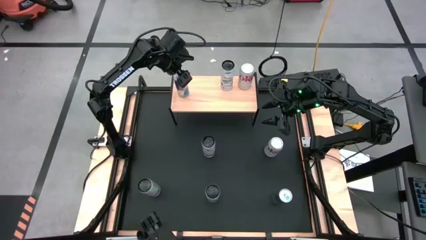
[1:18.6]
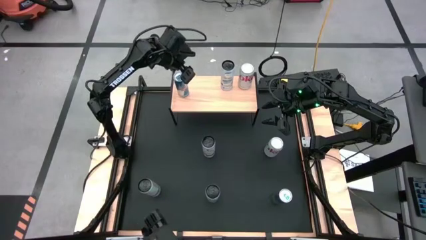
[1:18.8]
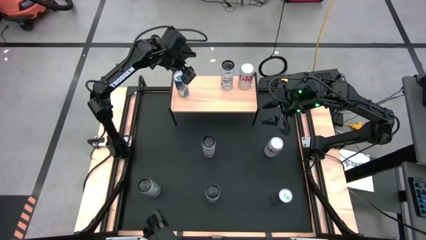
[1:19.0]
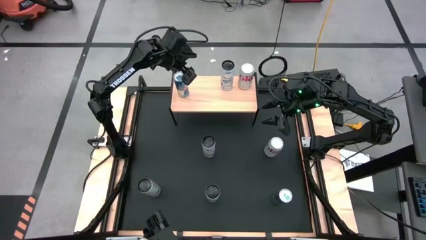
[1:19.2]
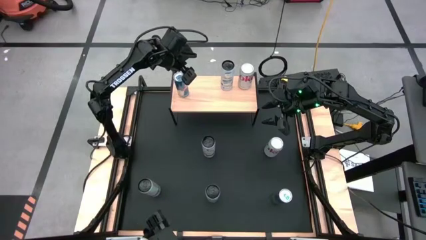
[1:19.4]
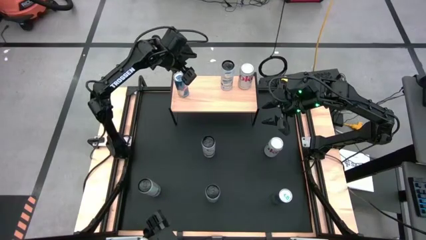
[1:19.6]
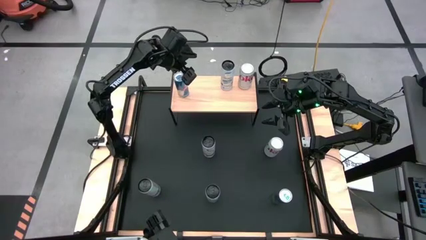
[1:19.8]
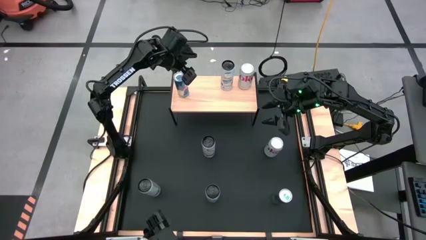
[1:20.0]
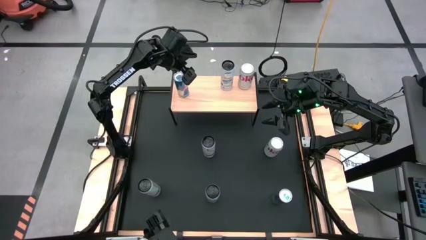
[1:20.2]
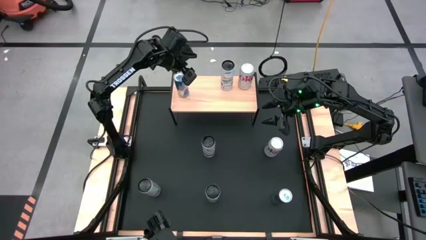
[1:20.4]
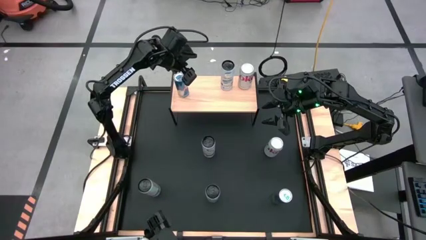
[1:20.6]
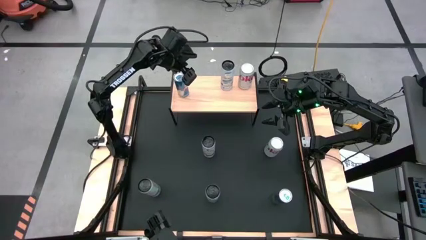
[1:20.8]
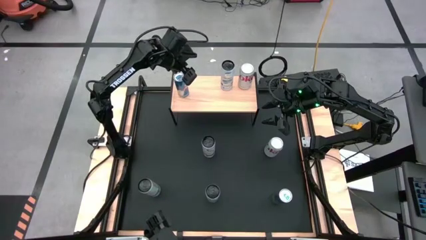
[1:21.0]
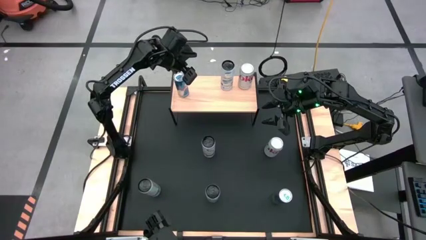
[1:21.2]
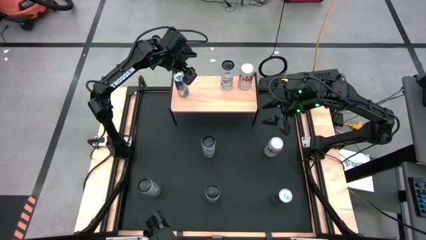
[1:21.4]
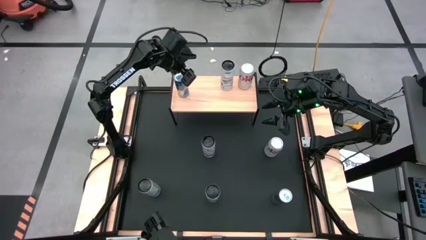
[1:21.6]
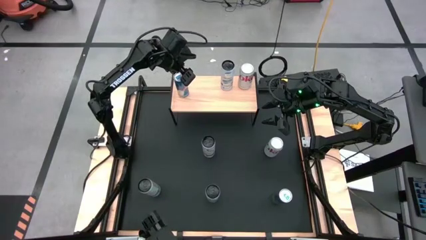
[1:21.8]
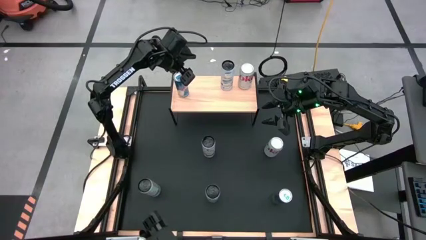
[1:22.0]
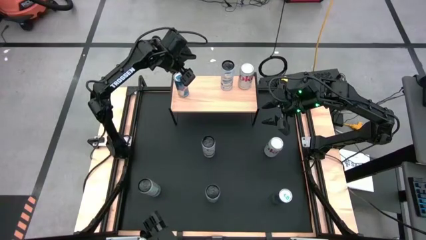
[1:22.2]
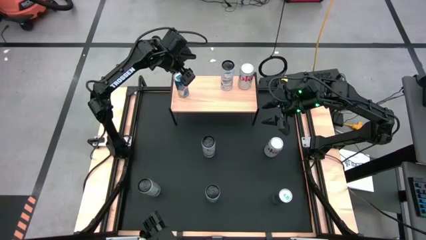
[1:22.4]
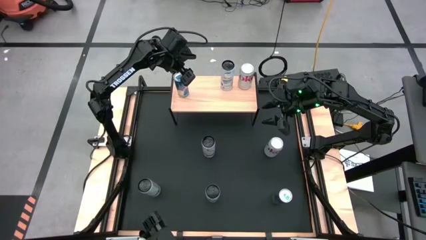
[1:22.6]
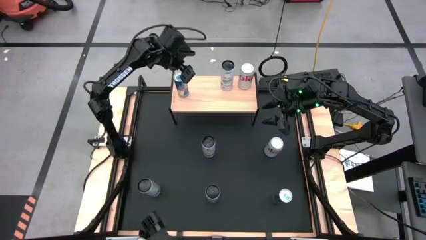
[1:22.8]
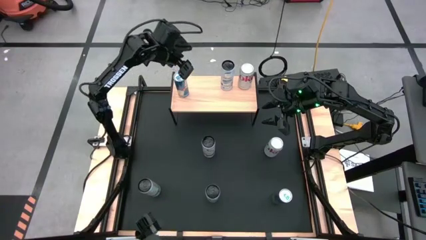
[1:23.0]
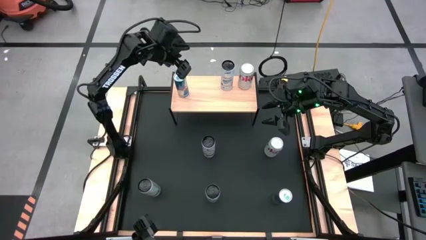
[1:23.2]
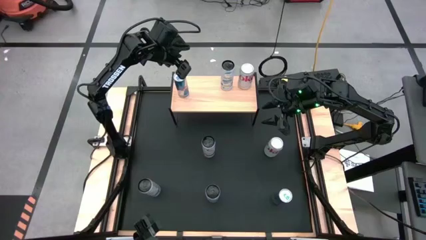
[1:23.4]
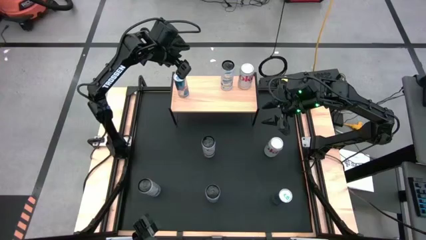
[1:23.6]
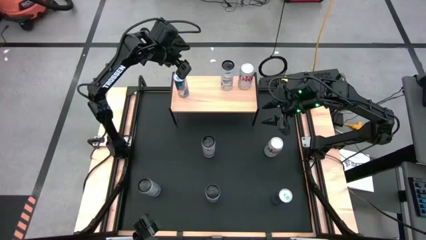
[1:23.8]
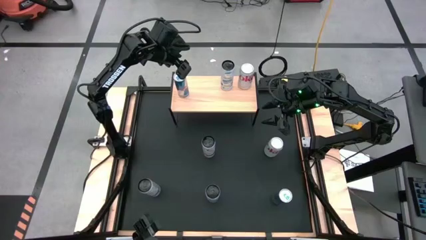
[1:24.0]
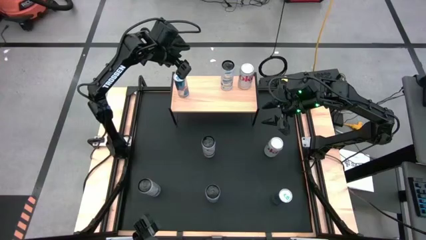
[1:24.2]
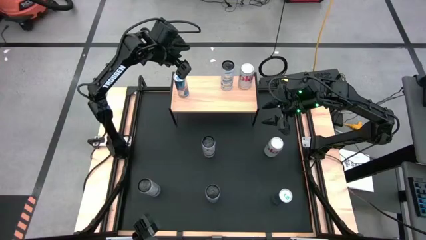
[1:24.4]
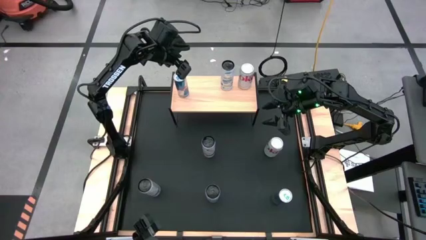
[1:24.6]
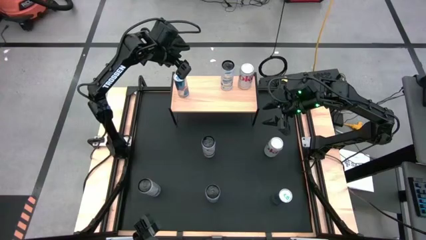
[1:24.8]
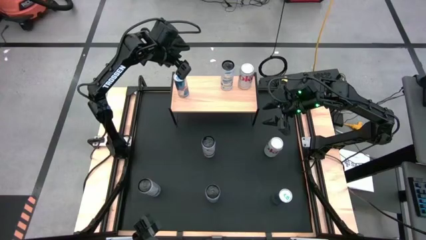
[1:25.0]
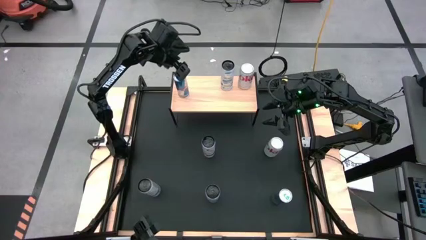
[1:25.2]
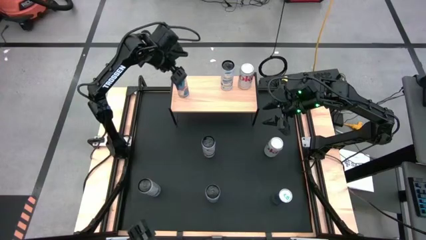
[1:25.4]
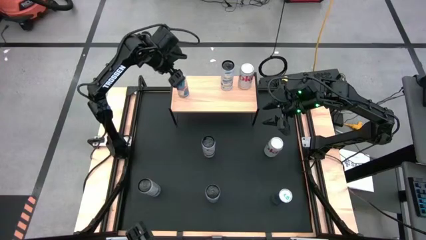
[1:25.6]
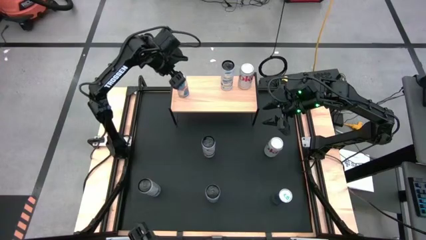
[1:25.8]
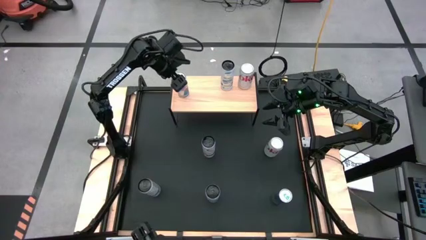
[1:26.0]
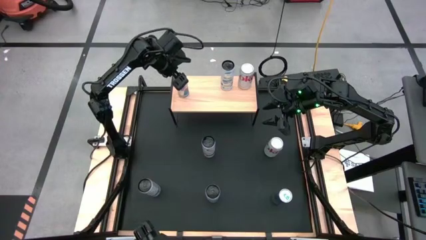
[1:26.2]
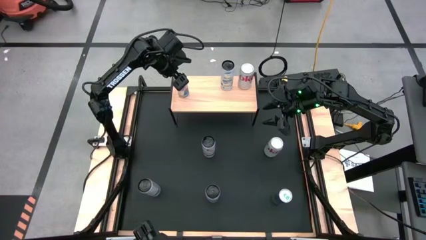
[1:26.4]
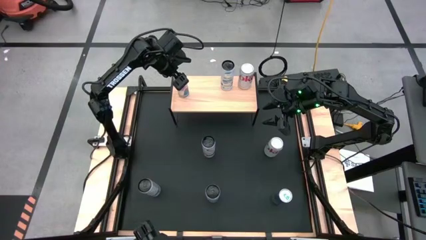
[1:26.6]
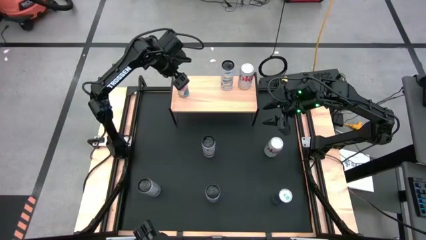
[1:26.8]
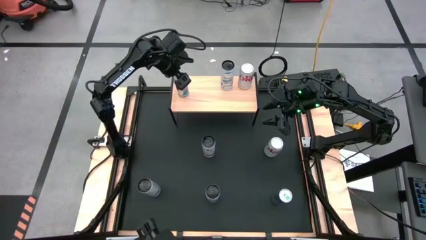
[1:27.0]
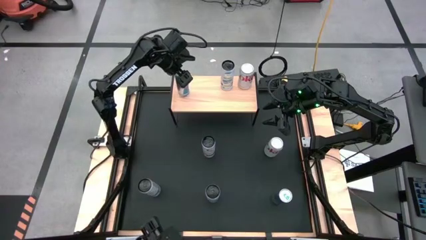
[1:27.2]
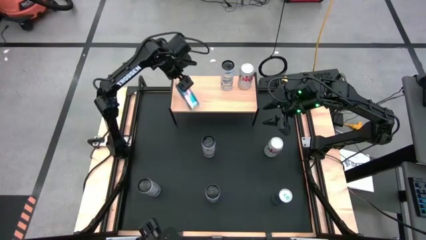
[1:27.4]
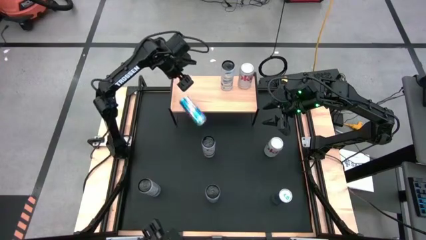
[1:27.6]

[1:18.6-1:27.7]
Task: Place canned beverage on shelf
Adjust the blue soda can

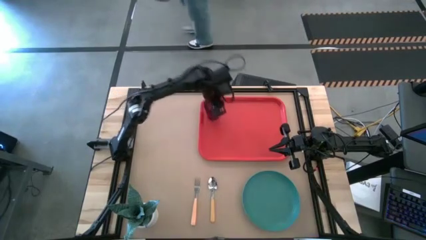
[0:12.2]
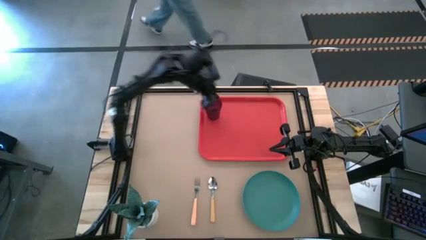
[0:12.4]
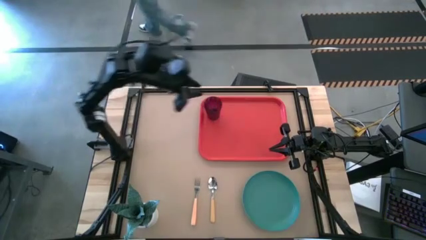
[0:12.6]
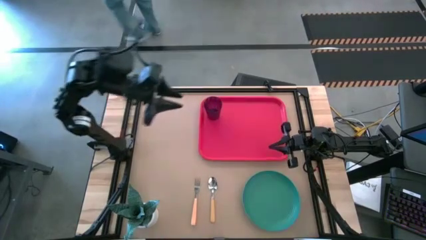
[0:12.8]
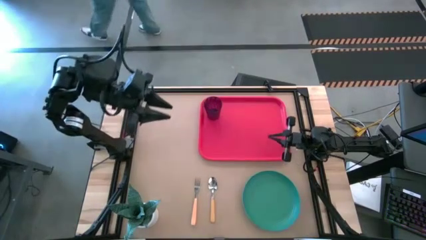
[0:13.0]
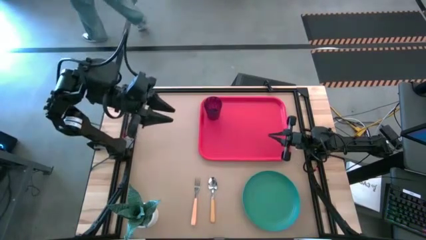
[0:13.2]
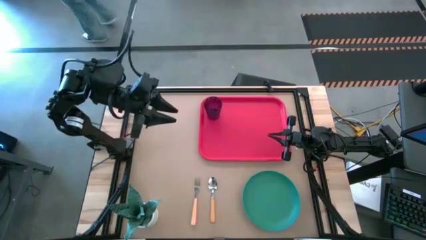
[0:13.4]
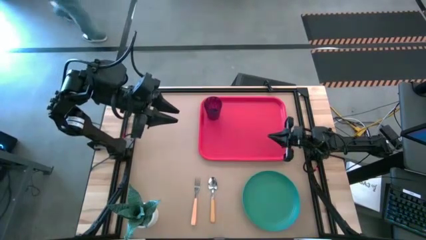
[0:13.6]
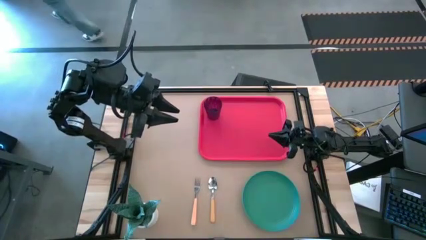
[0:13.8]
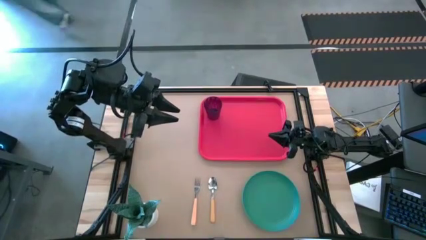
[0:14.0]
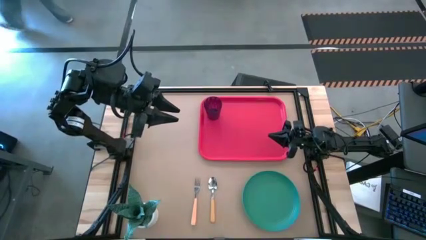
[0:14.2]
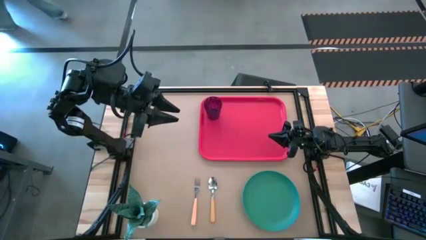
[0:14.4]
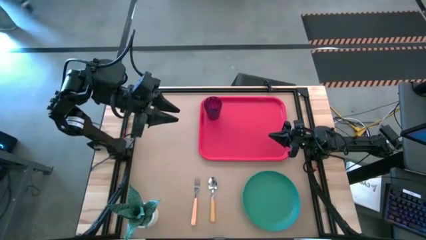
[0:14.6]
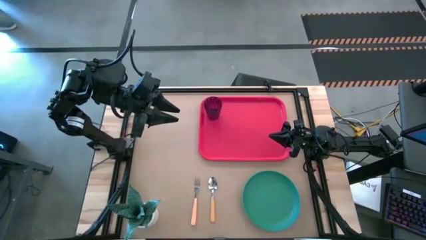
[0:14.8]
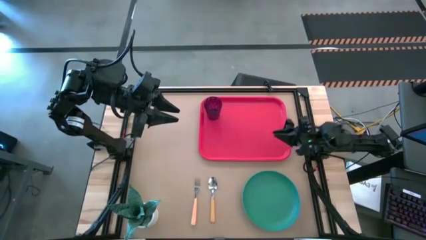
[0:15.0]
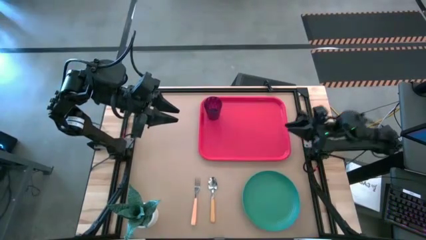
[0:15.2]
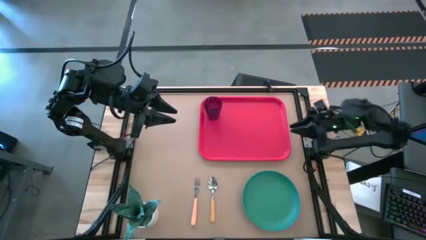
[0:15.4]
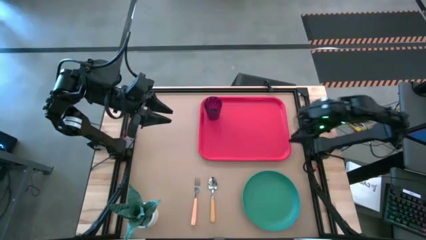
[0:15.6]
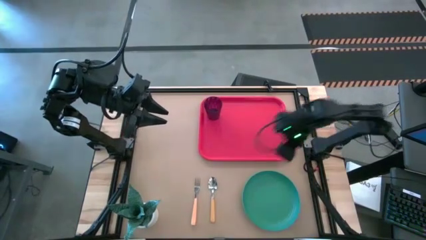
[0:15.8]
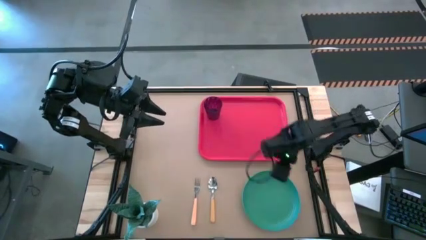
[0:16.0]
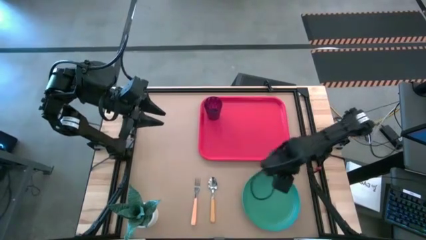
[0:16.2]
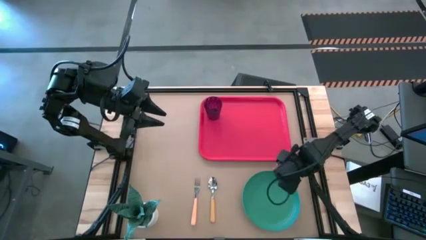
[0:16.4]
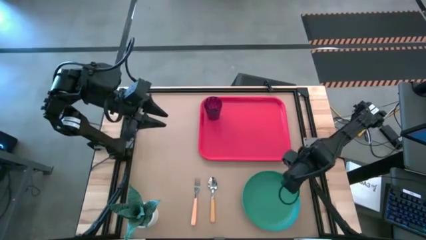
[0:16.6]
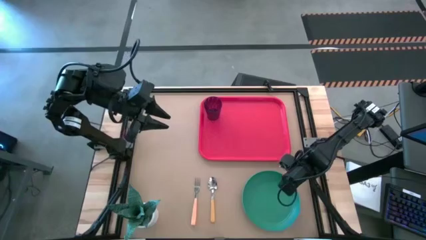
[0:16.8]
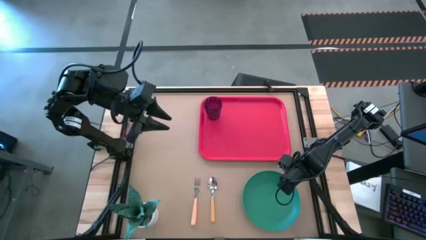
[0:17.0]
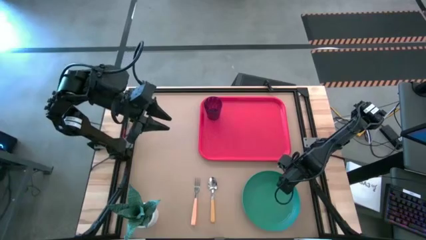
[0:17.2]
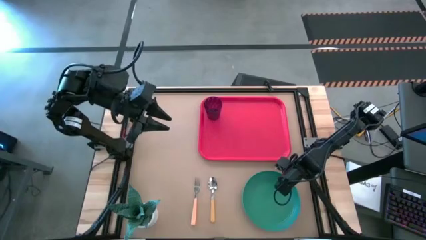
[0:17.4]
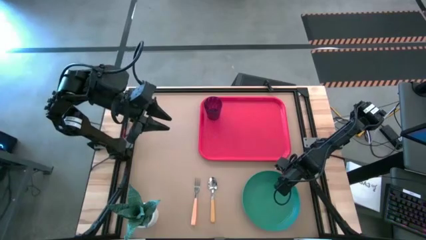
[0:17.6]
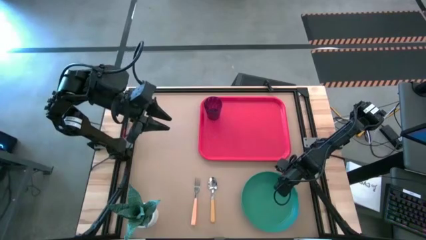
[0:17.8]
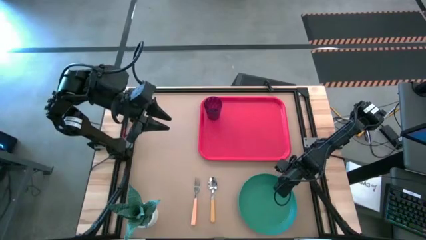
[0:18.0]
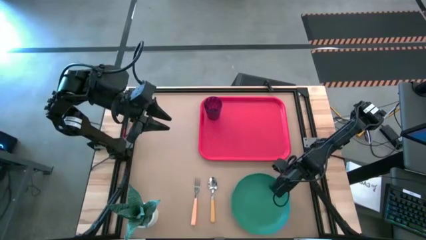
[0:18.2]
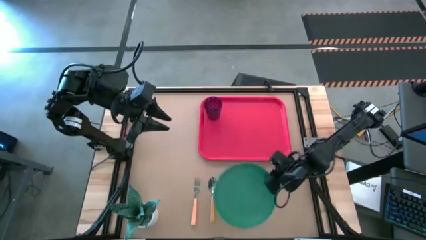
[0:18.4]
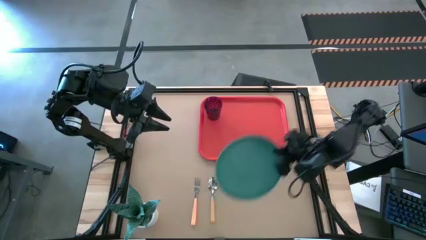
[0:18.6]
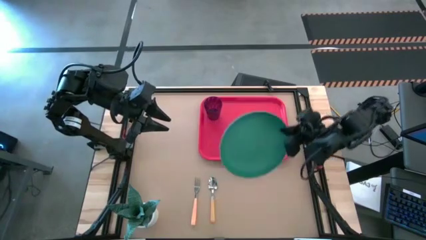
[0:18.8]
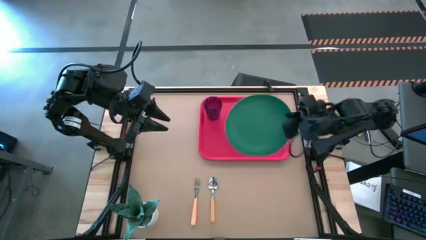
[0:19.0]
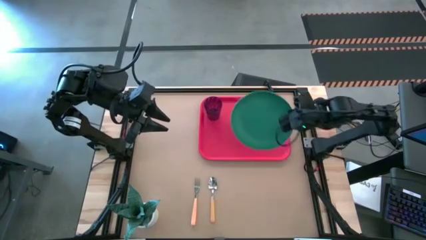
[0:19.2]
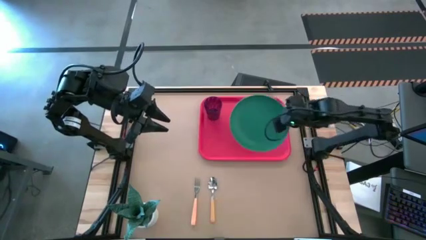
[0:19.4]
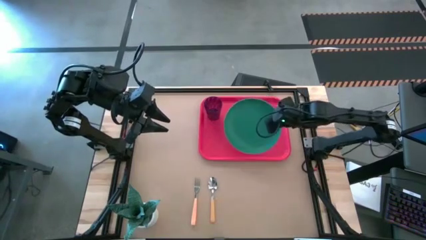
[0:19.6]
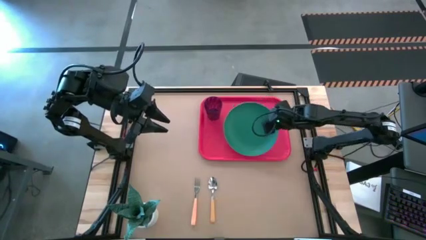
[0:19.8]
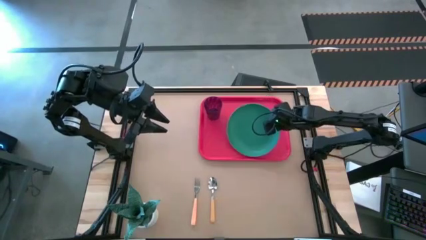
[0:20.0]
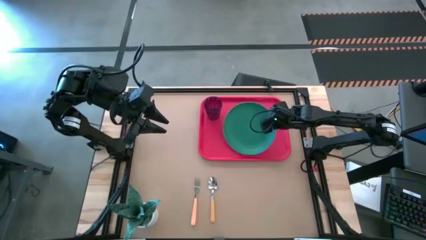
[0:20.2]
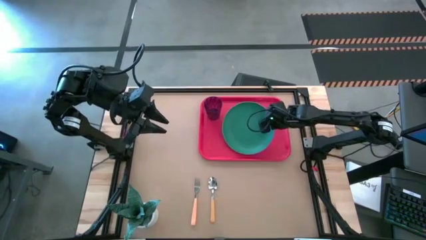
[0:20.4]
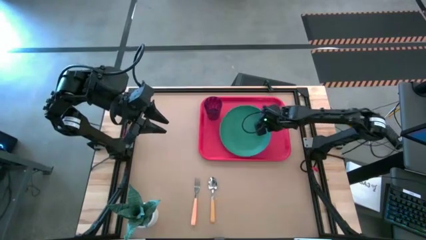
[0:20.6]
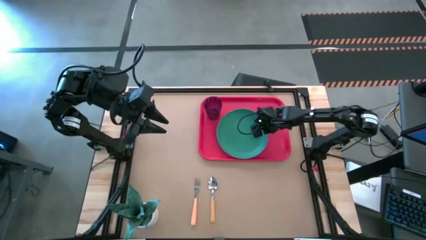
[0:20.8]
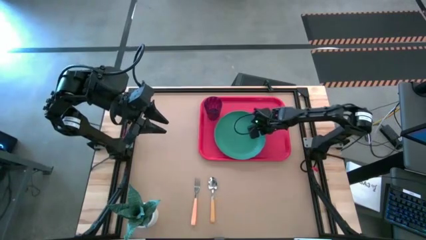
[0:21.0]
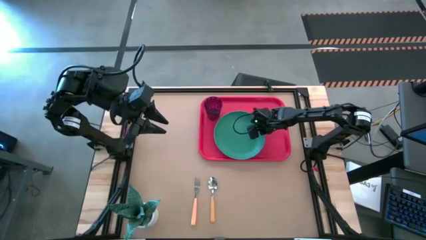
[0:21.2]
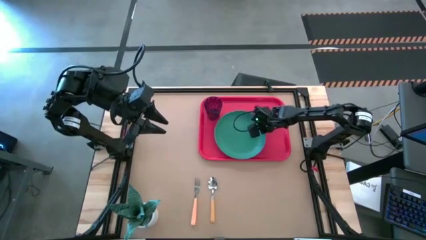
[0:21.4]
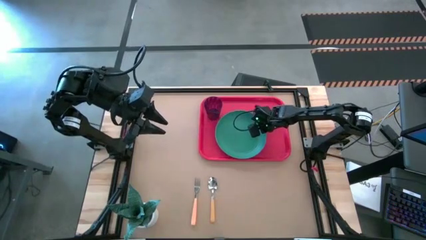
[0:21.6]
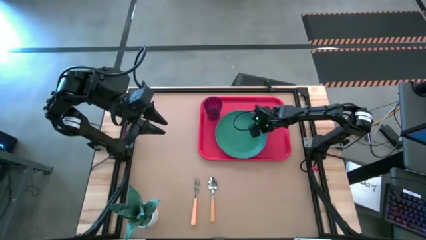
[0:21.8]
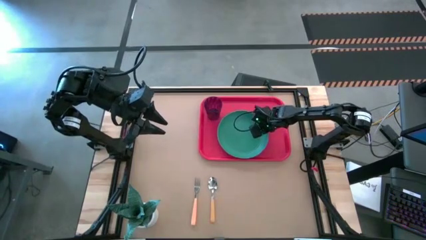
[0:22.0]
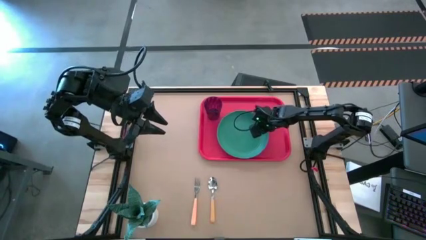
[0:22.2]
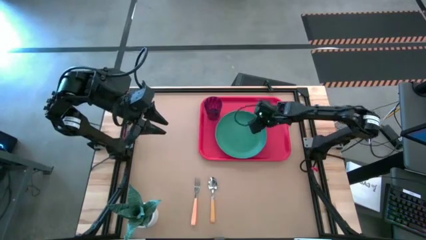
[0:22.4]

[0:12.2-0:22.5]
Task: Pick and place plate/cup/fork/spoon on tray
Put the green plate on the bottom right side of the violet cup on the red tray
